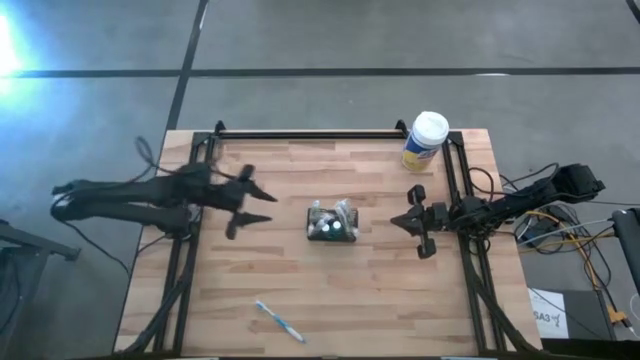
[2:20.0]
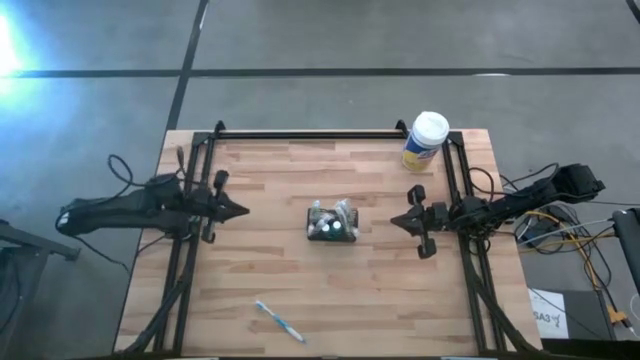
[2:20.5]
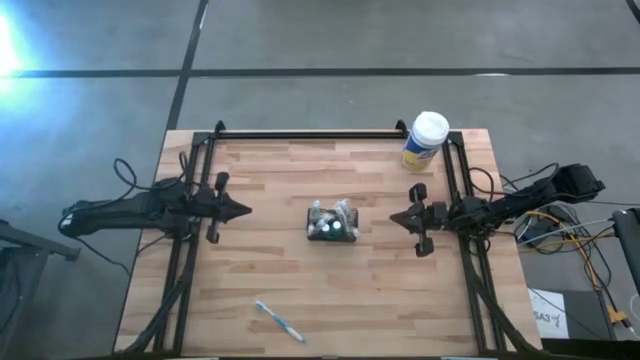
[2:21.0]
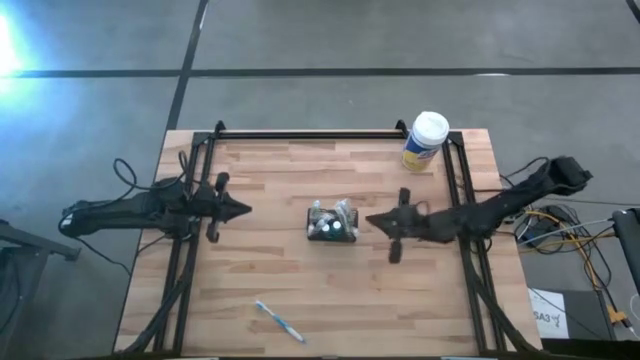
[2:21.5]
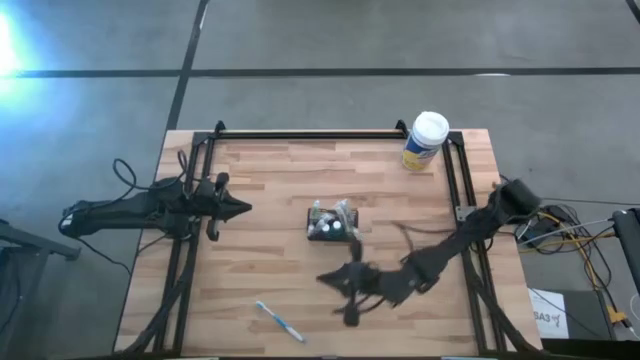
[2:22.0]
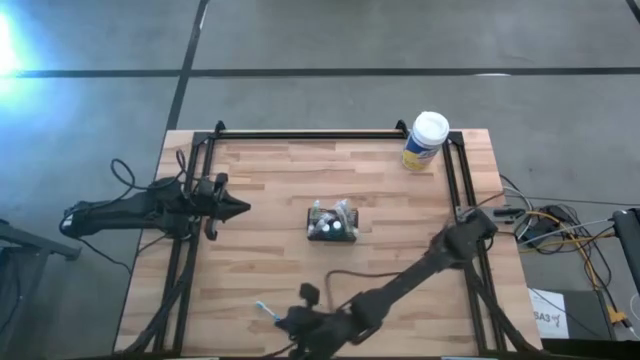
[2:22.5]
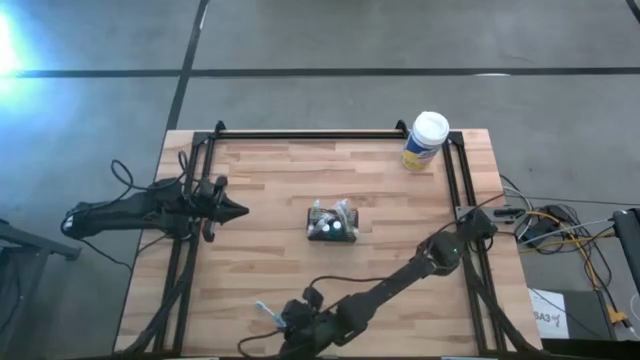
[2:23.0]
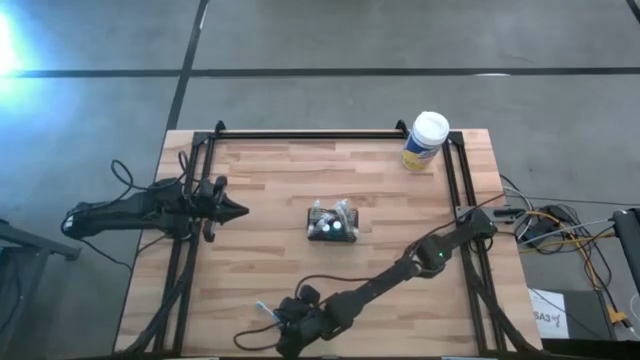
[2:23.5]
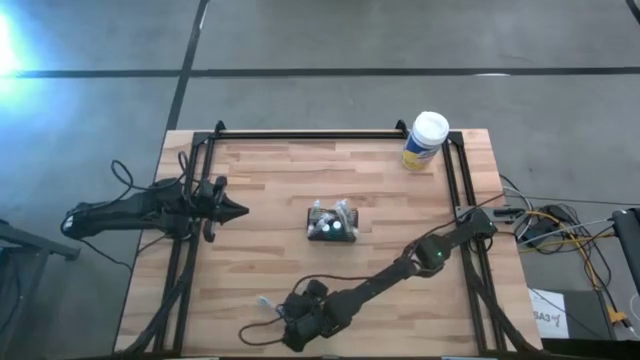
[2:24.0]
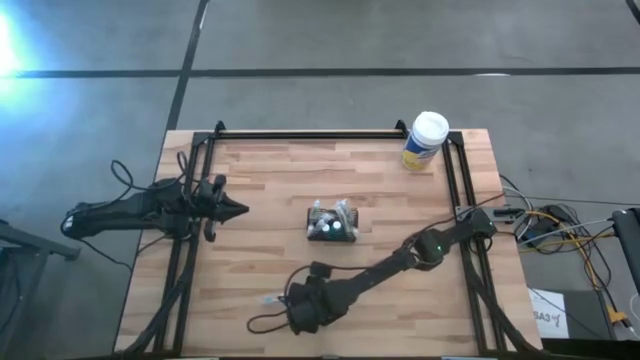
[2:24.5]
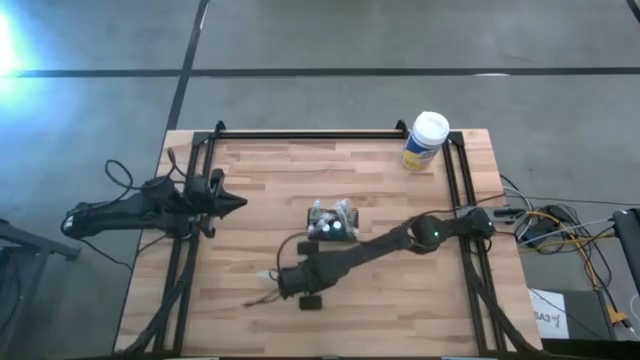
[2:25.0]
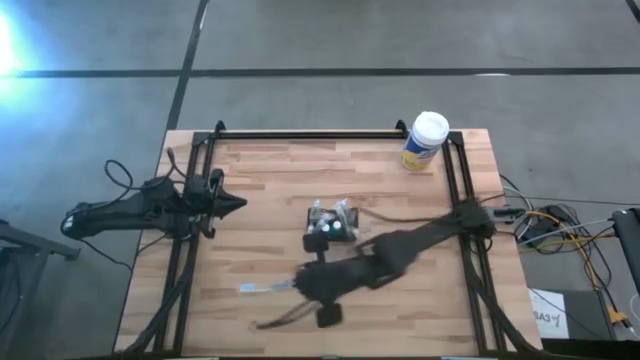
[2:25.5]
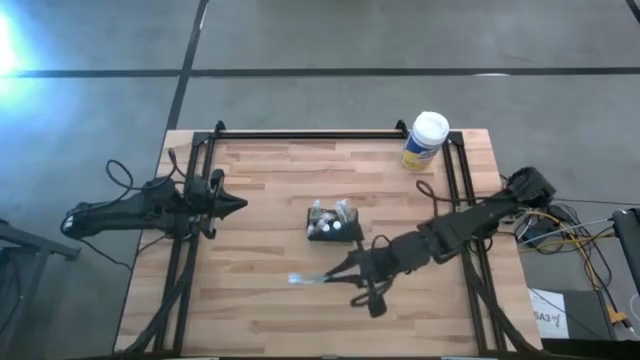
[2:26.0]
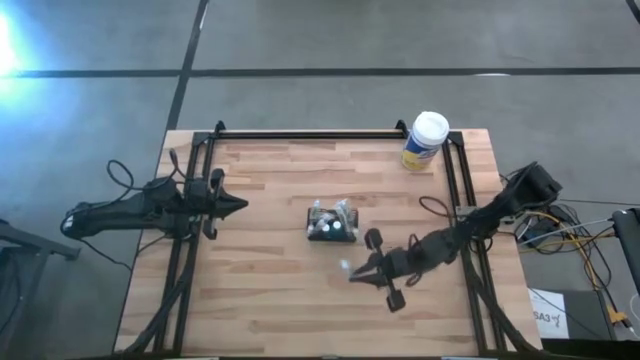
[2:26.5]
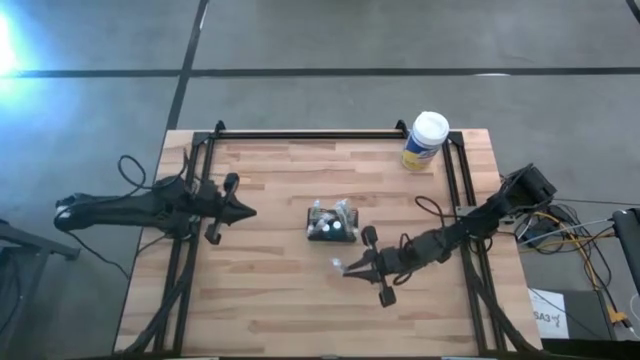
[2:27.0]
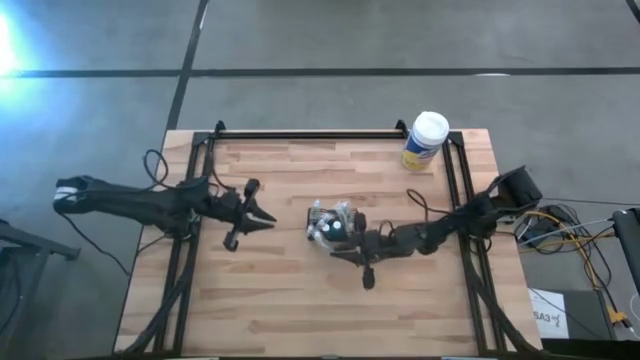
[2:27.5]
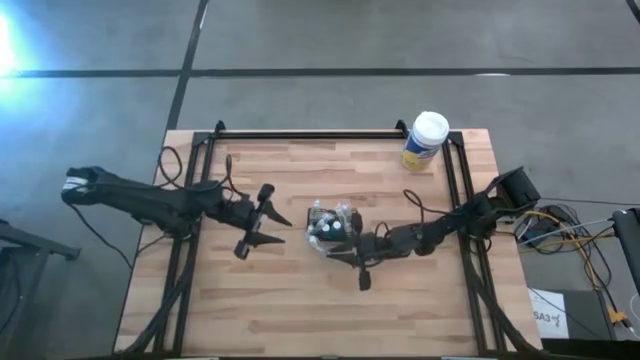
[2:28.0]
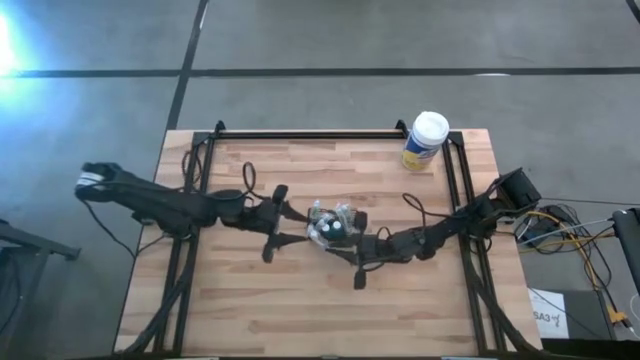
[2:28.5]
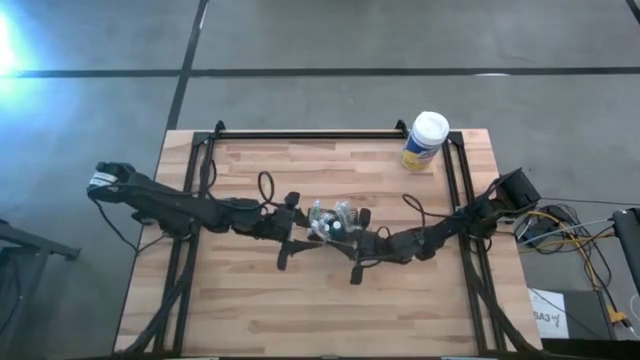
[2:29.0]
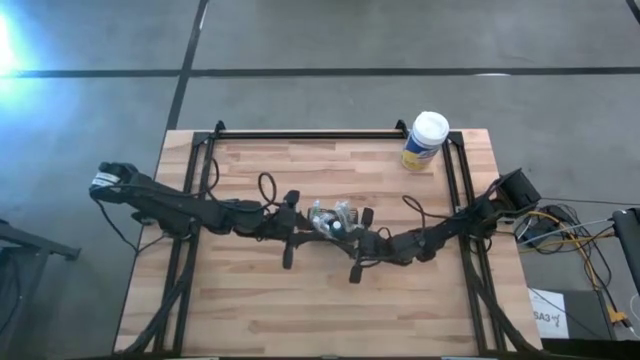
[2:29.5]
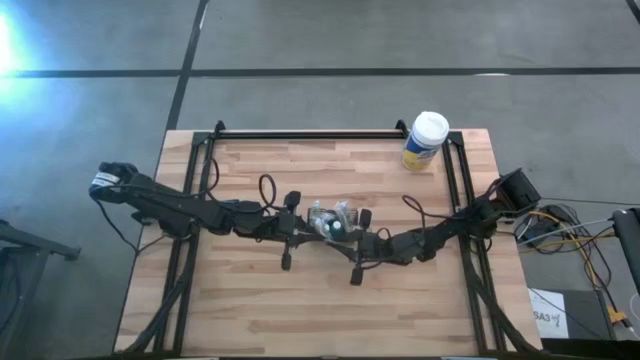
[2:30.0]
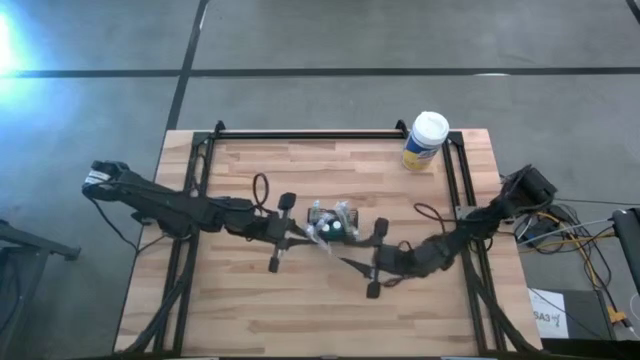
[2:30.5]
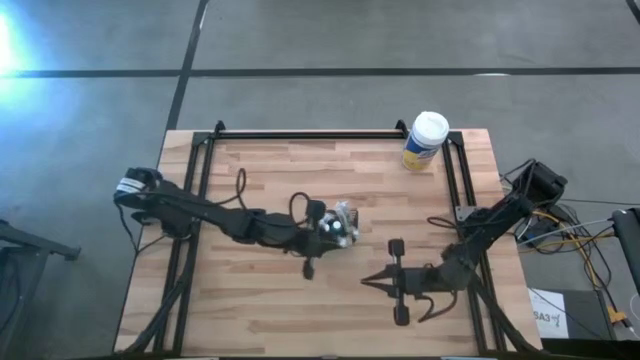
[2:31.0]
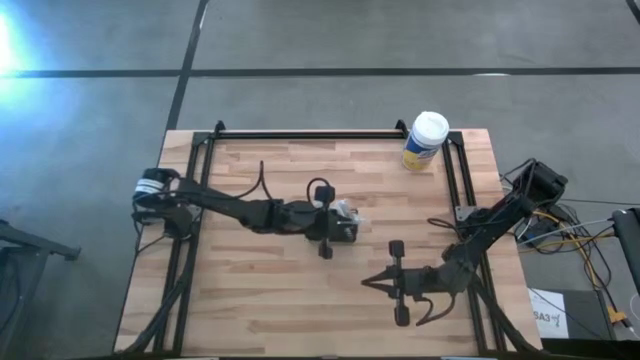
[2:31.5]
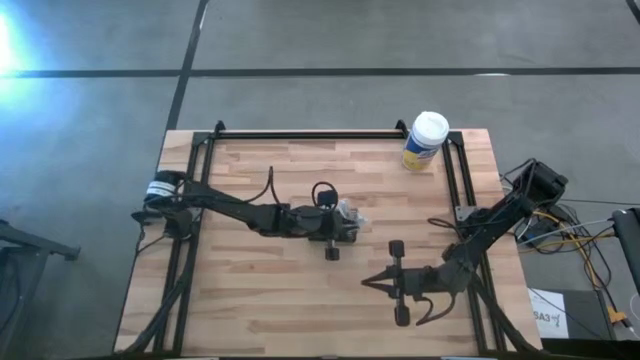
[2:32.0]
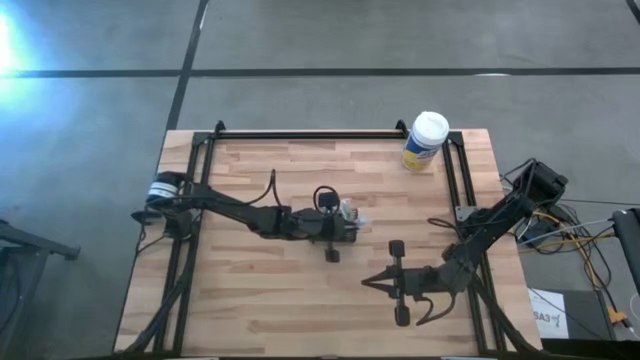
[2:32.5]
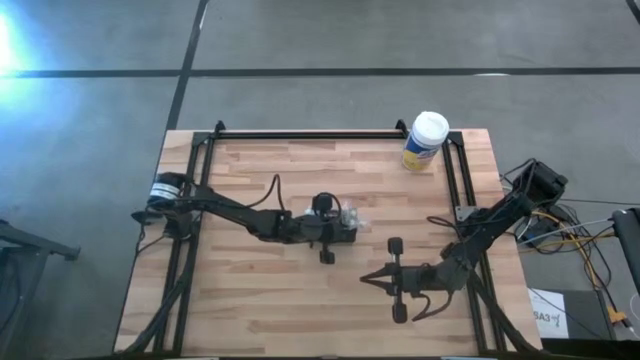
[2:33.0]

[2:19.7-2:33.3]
Task: Pick & Place toothbrushing station
Put the blue toothbrush into the black wire organizer

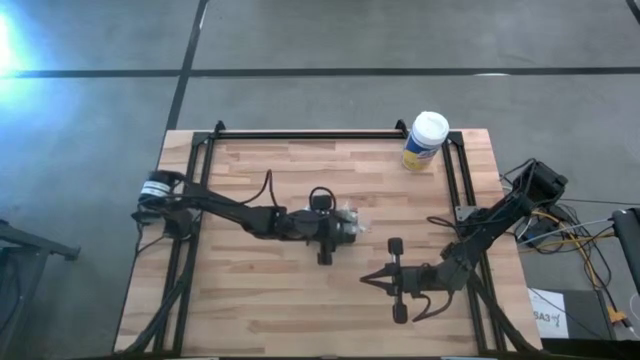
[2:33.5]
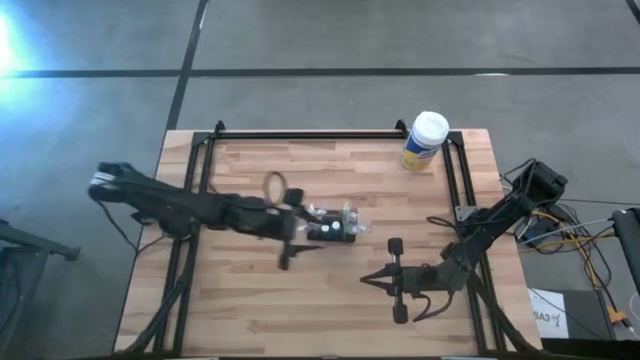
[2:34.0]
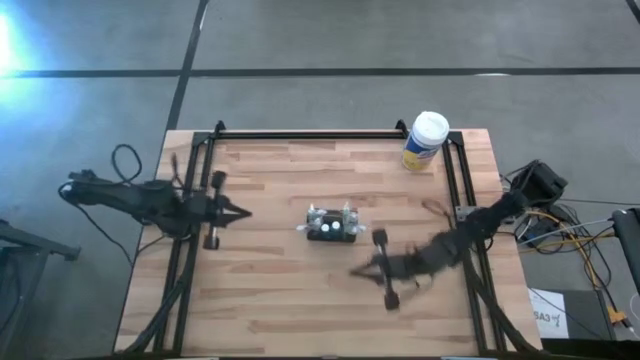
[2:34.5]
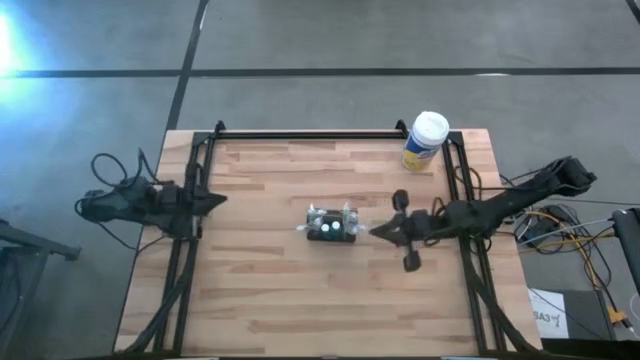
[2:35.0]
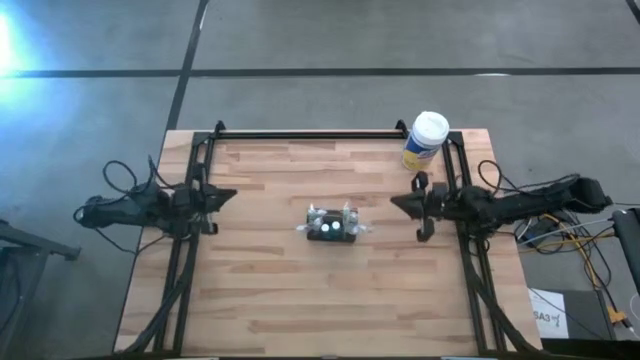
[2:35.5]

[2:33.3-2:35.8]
Return to Home Position

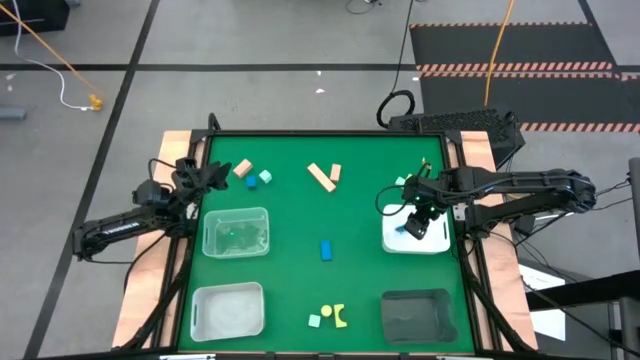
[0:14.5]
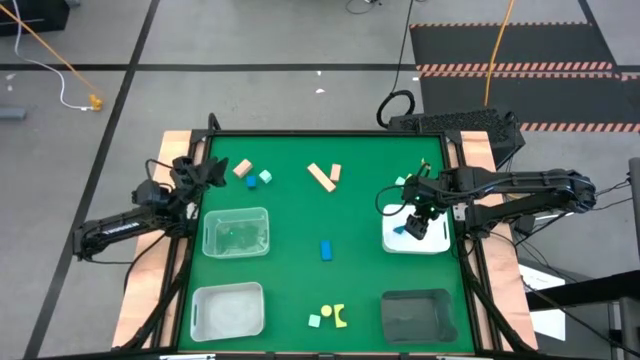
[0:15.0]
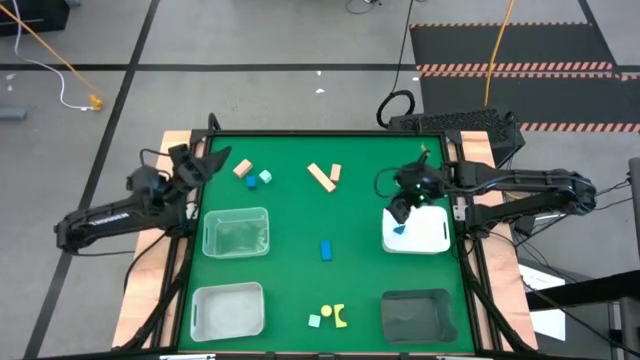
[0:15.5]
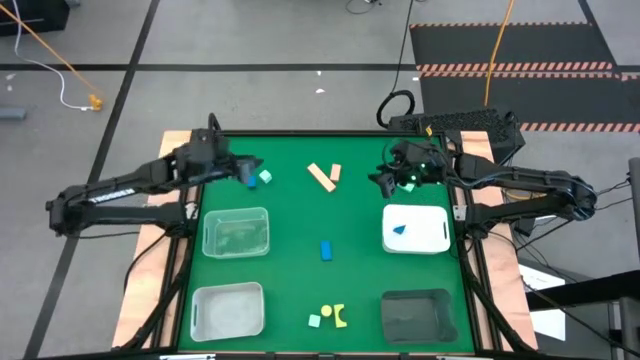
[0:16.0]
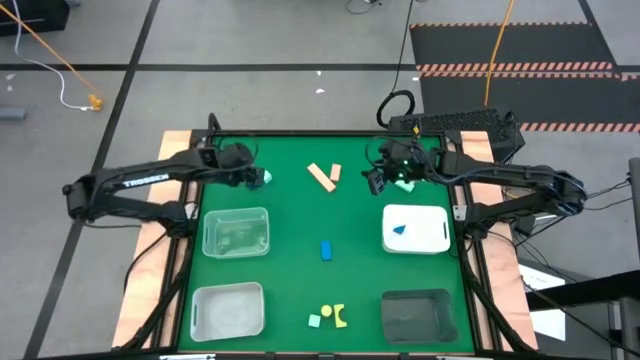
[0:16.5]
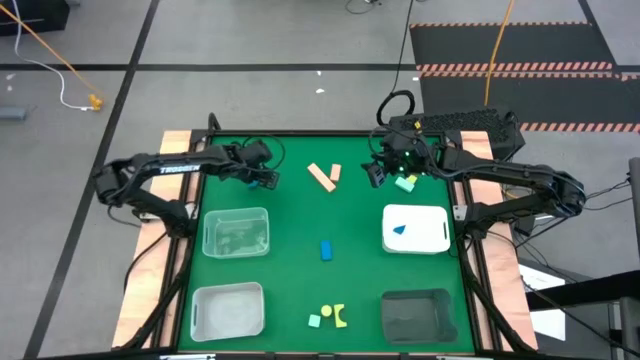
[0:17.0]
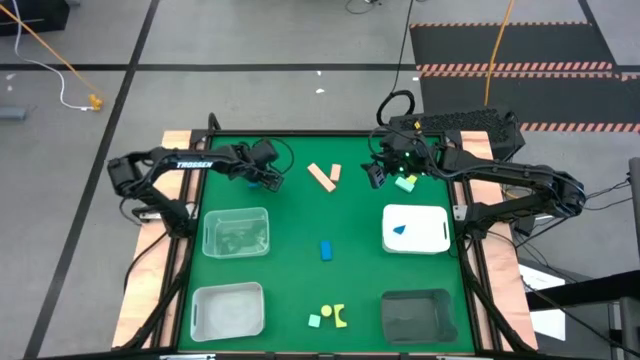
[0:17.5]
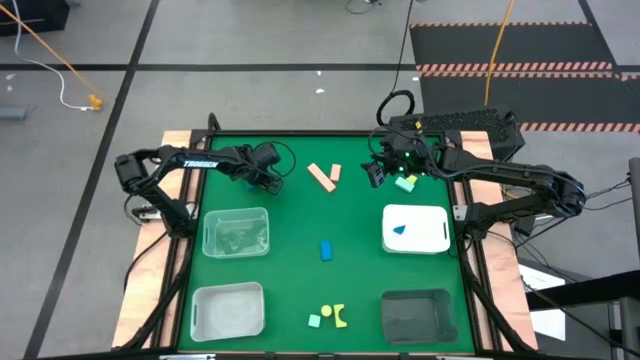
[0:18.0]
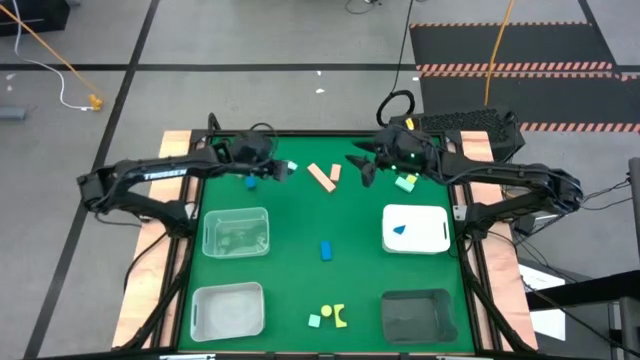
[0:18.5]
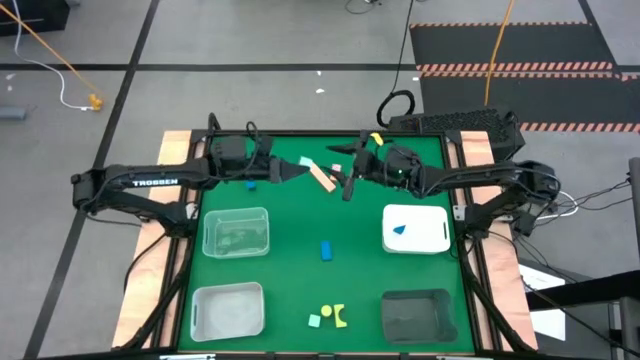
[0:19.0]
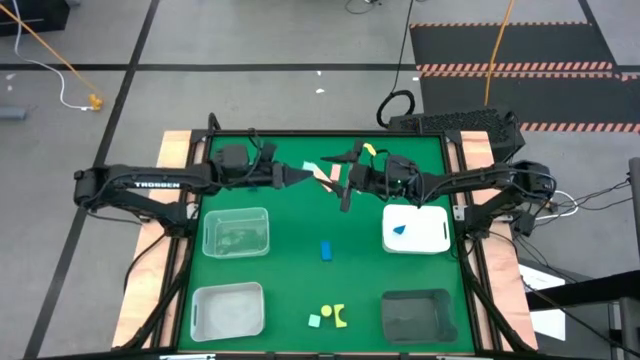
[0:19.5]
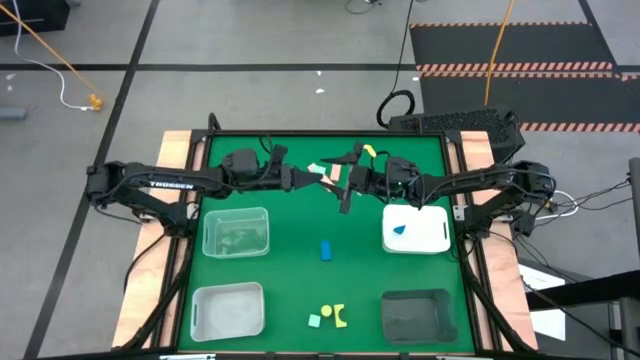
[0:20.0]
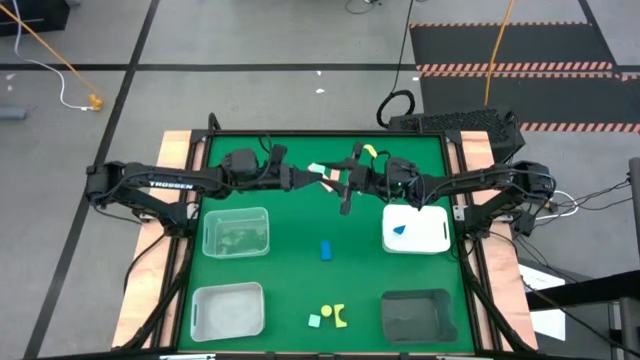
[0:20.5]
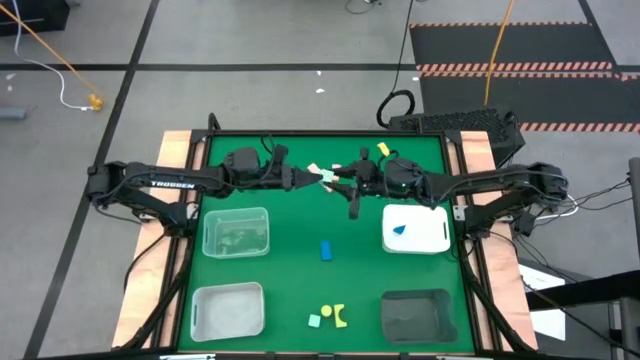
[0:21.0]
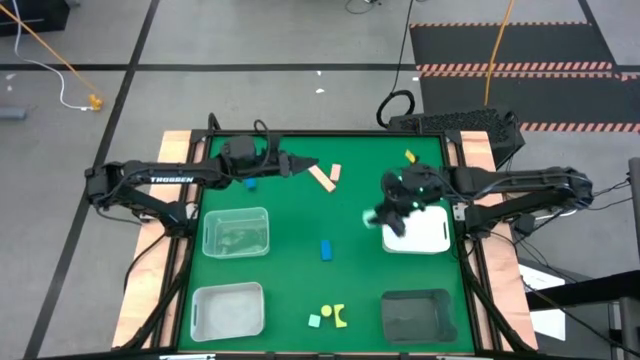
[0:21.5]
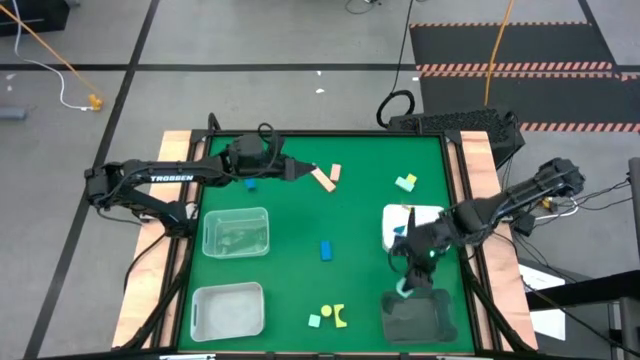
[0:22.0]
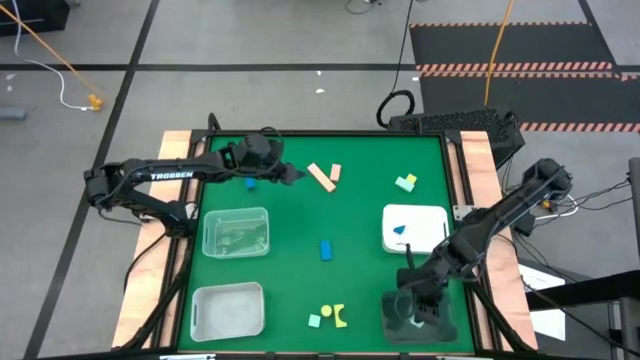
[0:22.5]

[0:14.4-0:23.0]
Task: Sort & place blocks by color
Put the top left light blue block into the black bin
